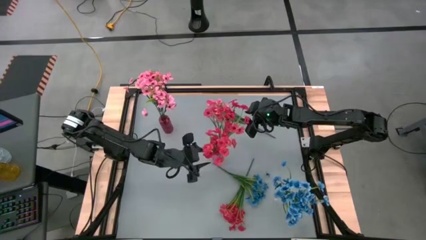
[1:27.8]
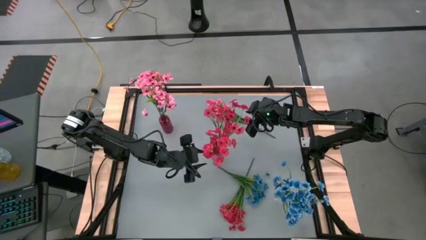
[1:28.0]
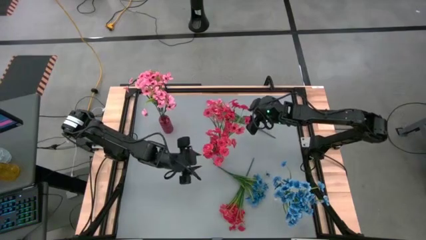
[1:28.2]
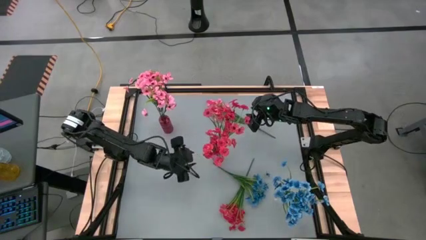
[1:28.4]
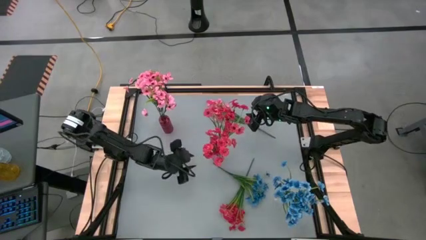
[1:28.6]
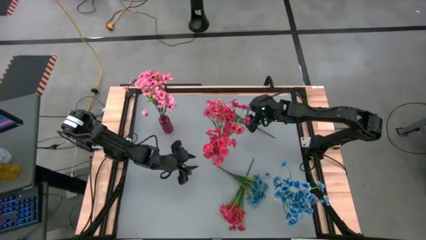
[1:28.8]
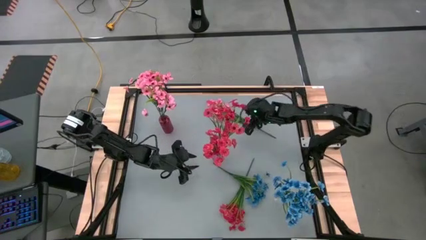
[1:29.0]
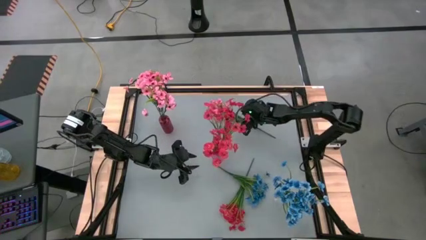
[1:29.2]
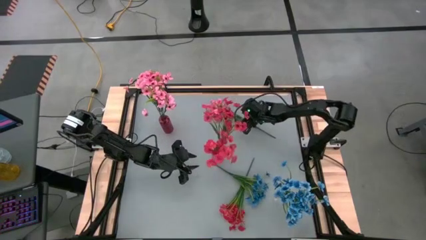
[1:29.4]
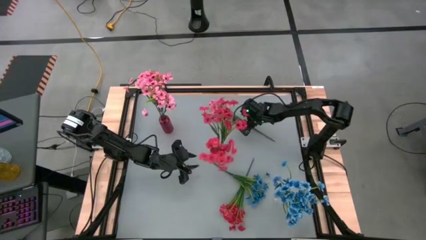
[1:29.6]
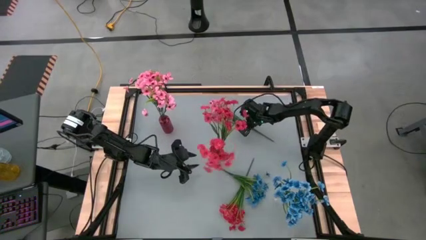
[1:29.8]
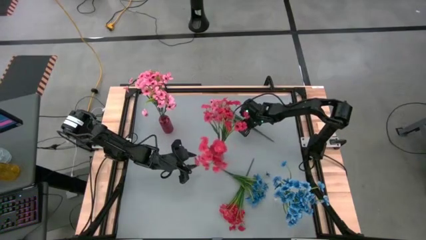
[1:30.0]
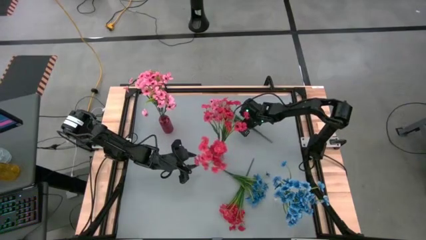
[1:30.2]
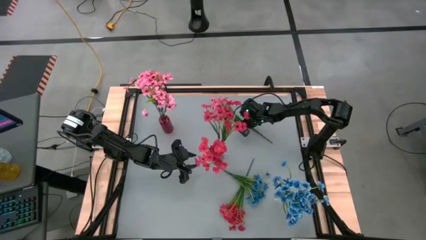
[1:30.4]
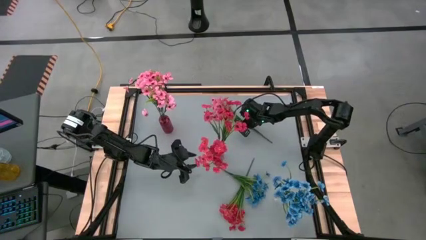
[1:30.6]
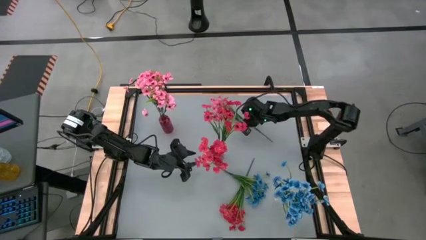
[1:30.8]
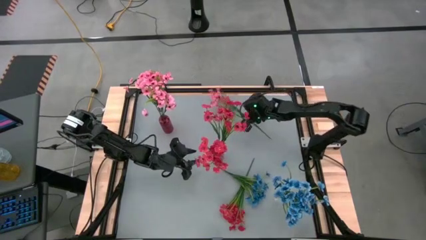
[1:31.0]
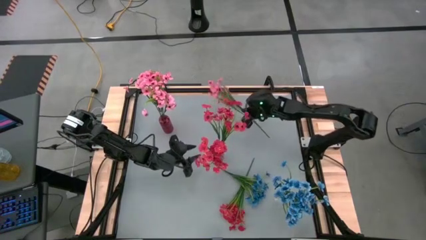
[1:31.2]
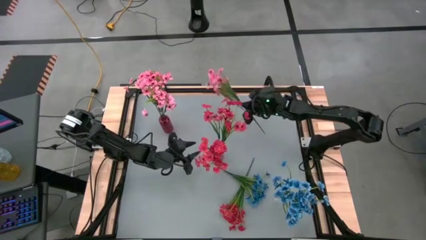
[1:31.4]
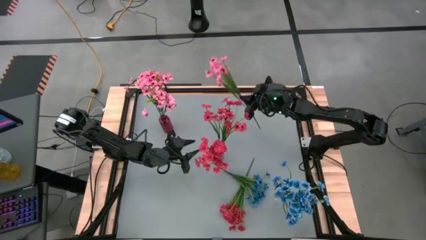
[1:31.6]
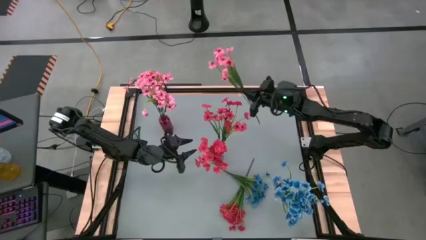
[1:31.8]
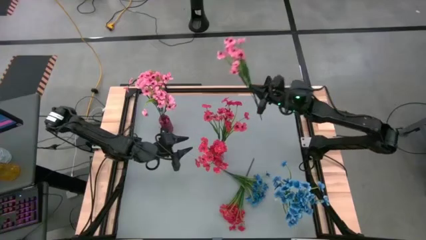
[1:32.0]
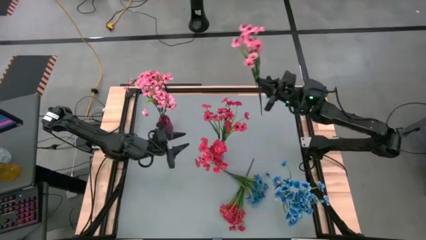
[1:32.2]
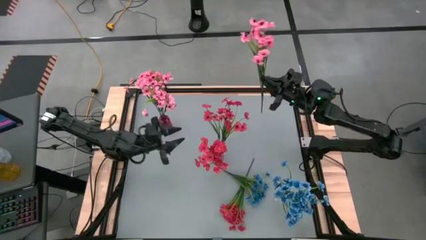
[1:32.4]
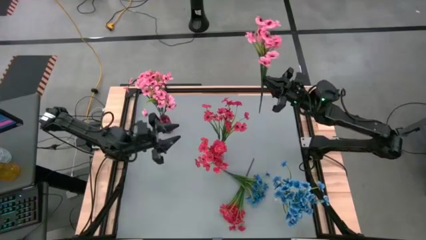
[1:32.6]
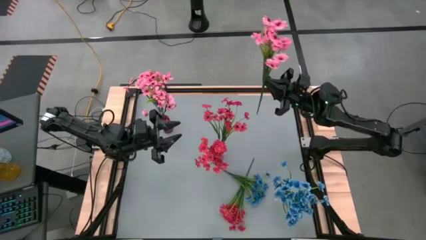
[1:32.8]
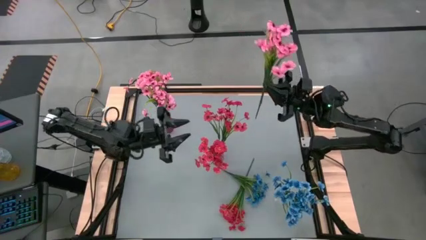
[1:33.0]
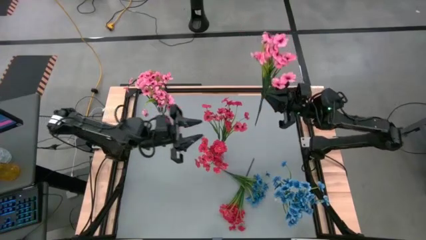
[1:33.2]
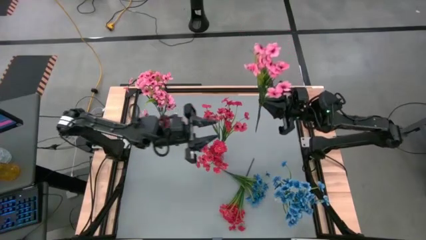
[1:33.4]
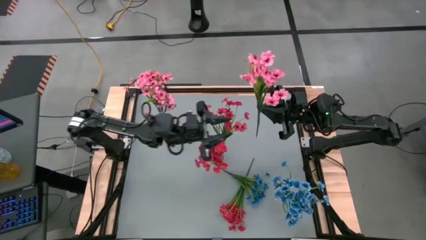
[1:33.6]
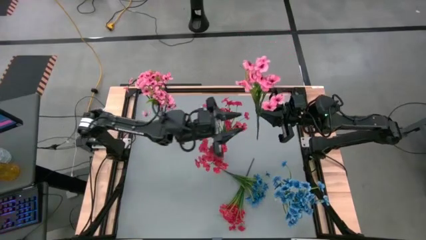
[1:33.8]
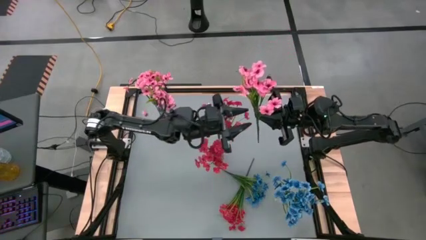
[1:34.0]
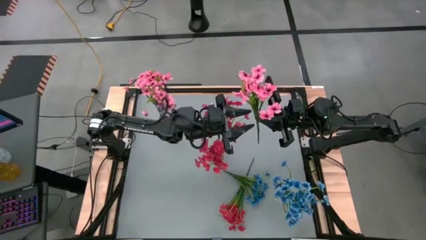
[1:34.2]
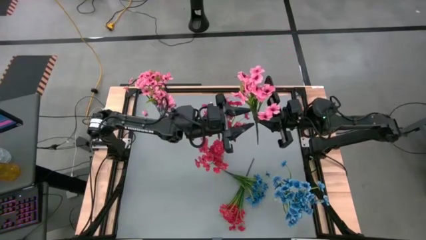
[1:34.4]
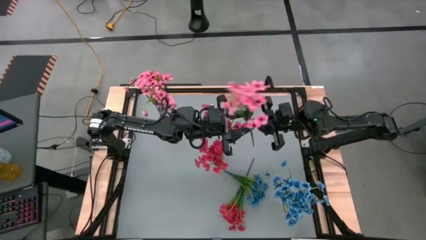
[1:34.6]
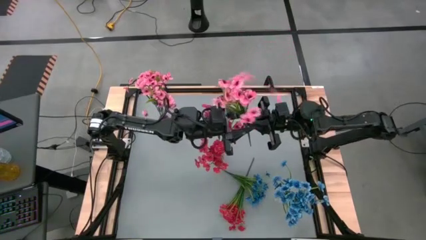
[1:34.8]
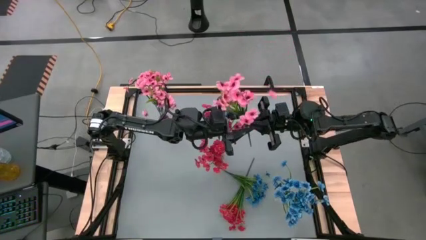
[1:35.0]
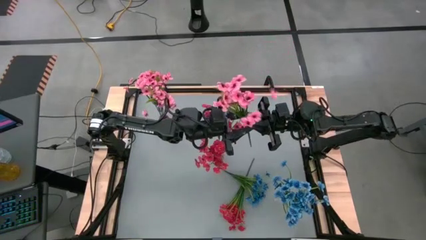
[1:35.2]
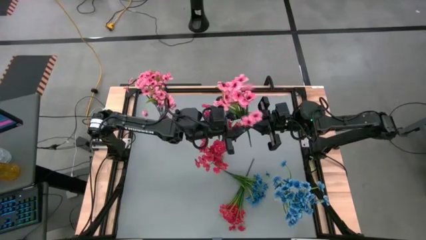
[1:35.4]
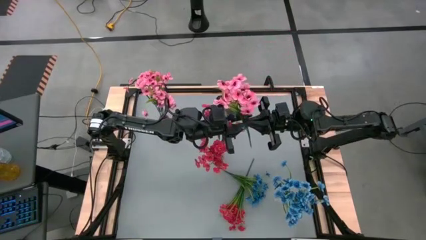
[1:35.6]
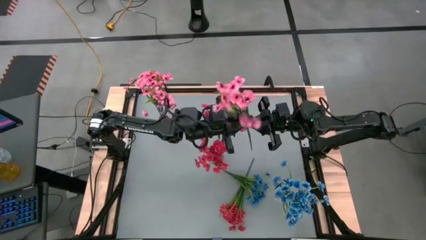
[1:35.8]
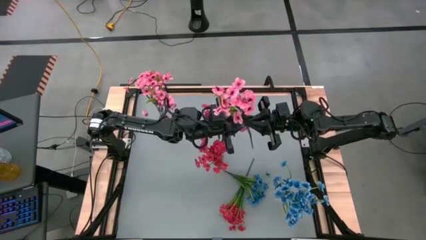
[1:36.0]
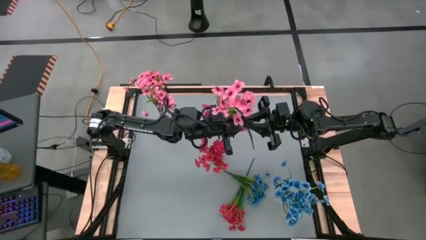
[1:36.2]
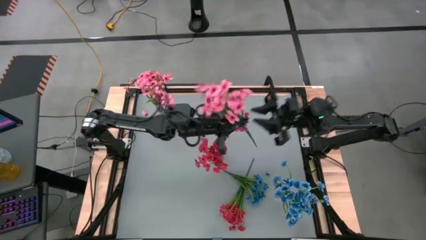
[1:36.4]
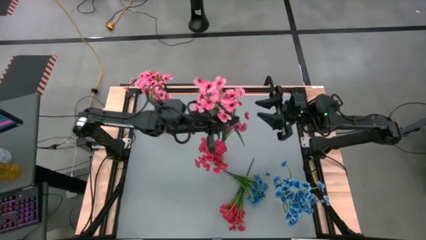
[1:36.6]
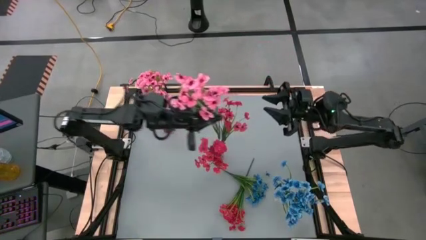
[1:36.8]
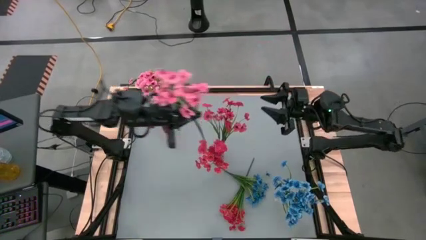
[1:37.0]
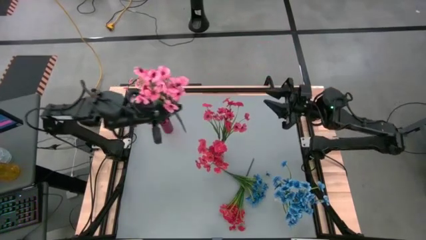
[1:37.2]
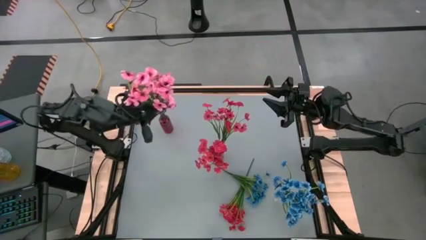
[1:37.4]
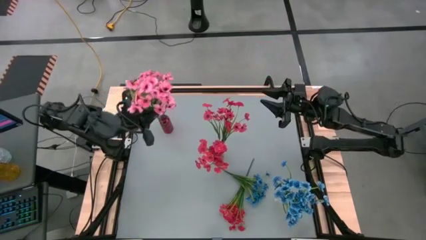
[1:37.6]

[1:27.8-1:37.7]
Task: Sort flowers into vase by color
Put the pink flowers into the red vase
